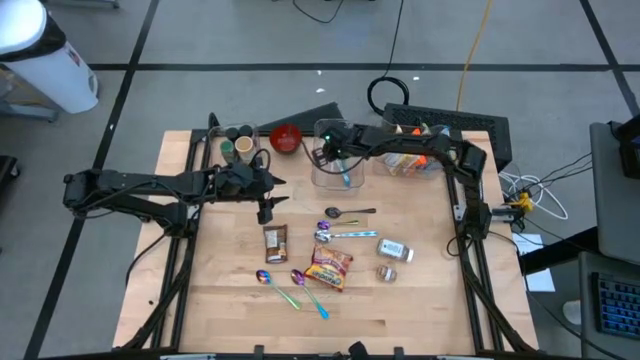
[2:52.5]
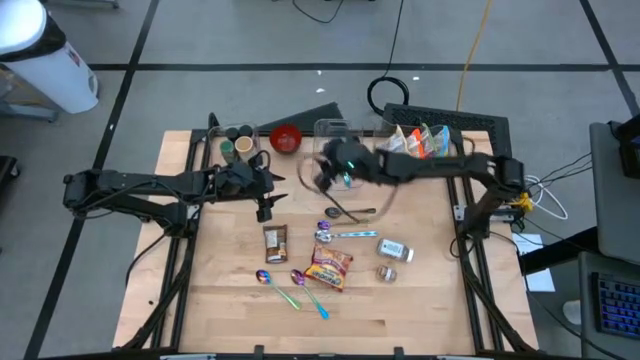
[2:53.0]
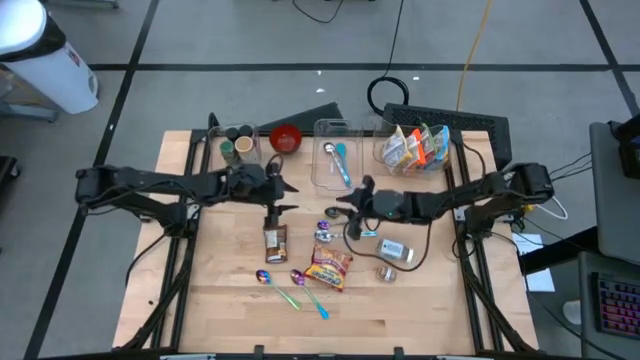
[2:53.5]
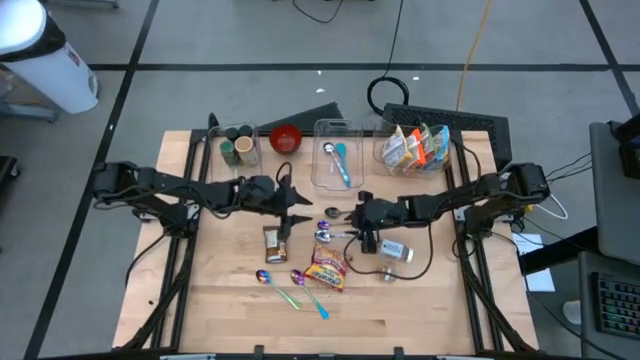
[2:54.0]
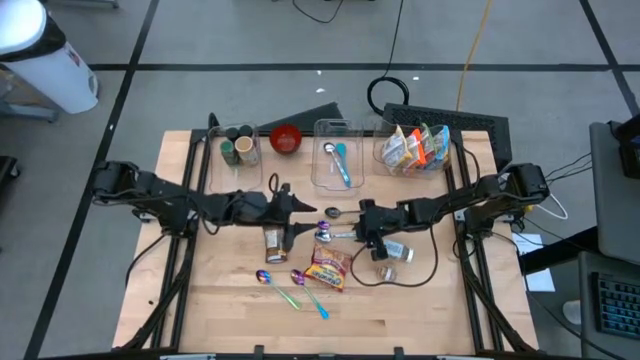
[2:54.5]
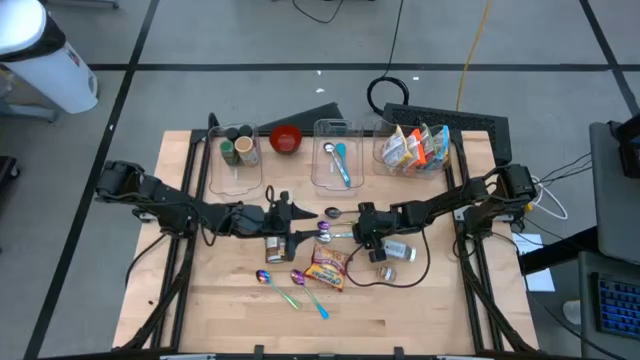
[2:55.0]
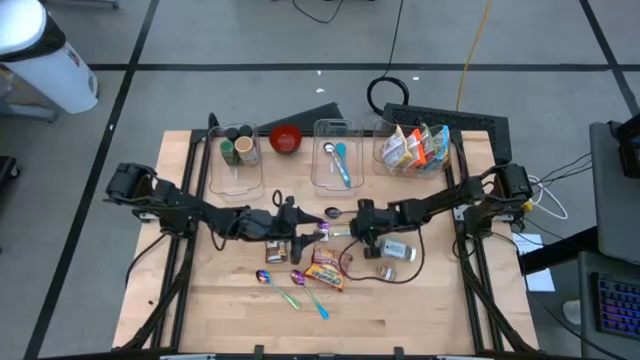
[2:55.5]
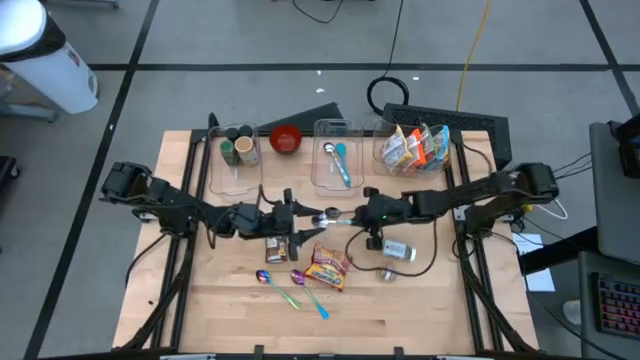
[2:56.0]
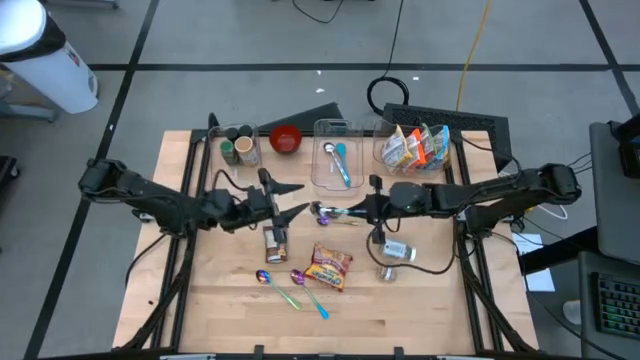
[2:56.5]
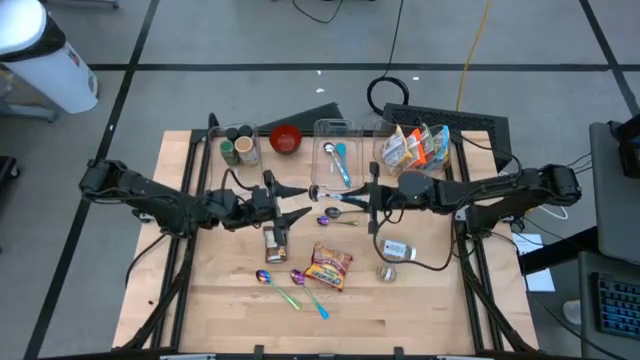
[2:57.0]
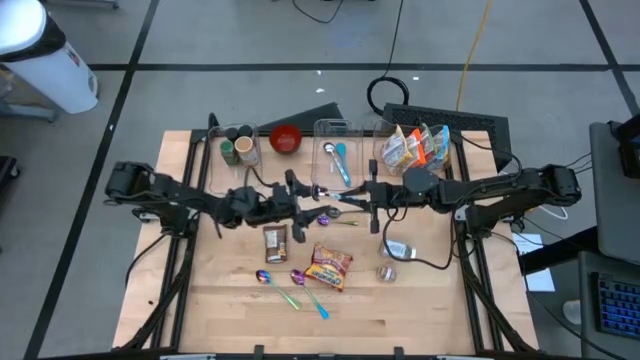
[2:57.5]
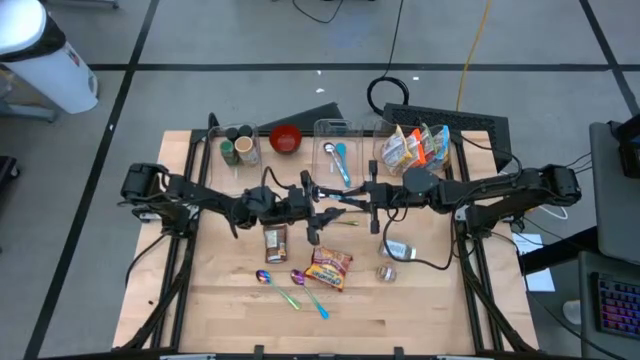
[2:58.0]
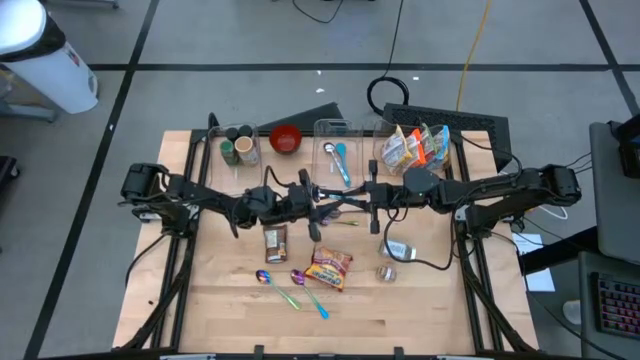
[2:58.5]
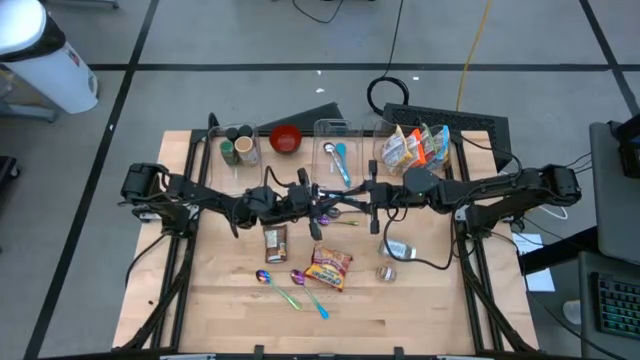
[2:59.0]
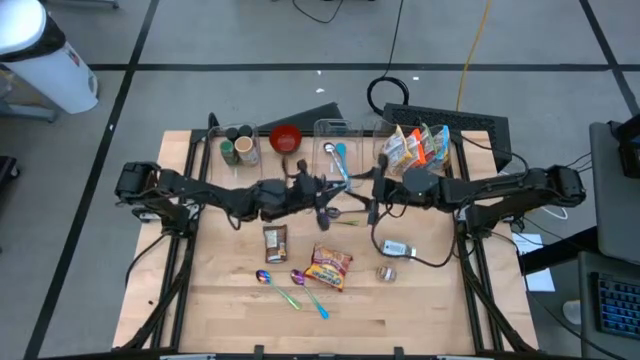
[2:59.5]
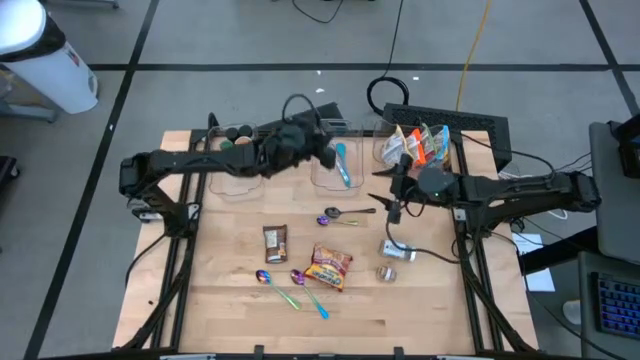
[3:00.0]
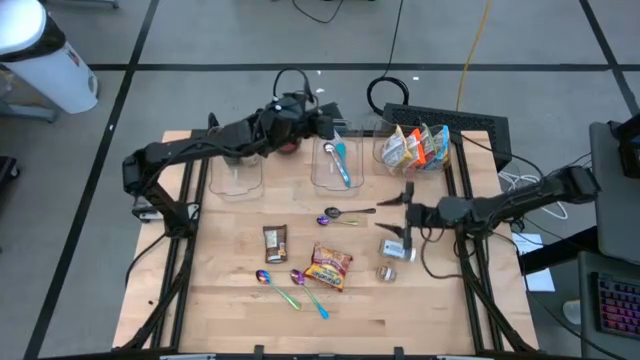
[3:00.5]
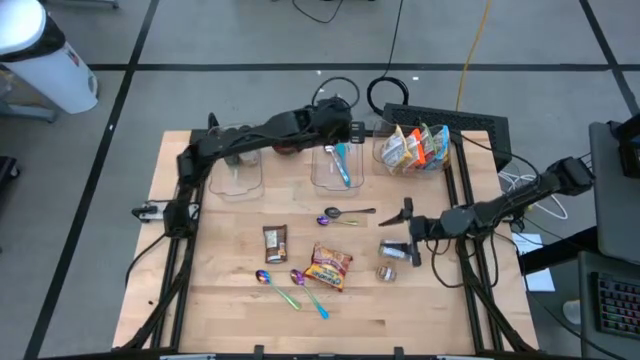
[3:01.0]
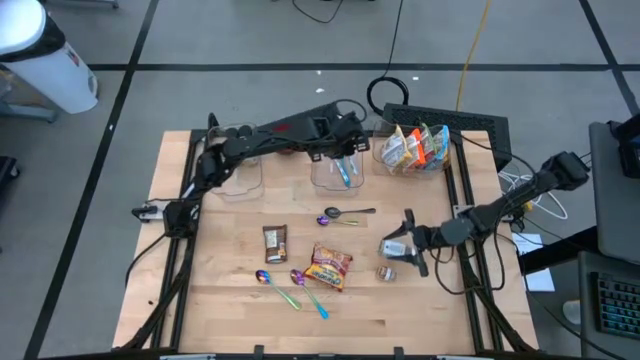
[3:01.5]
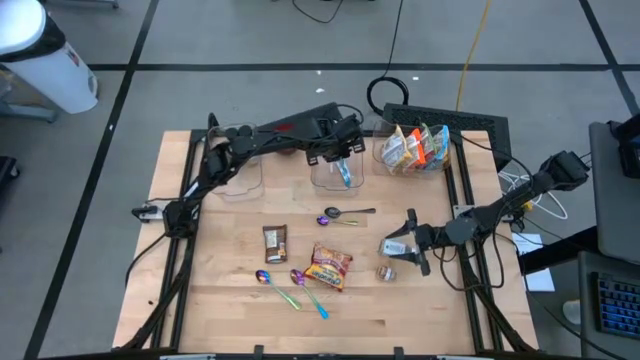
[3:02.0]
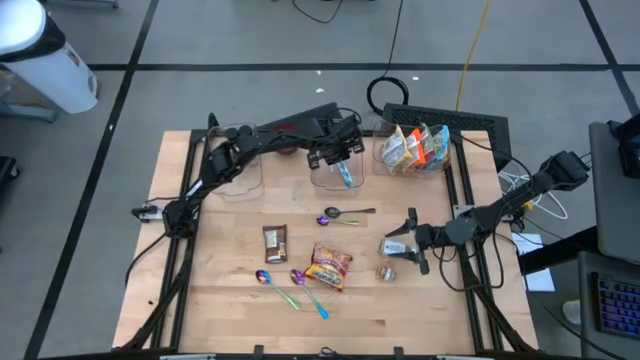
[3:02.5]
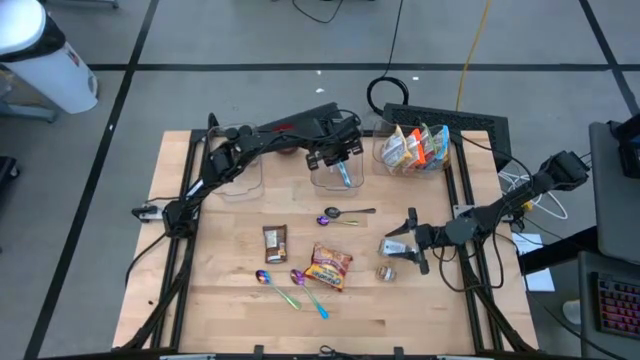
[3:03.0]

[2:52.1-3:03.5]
Task: Pick & Place Food Item
Put the blue patterned spoon into the middle transparent bin

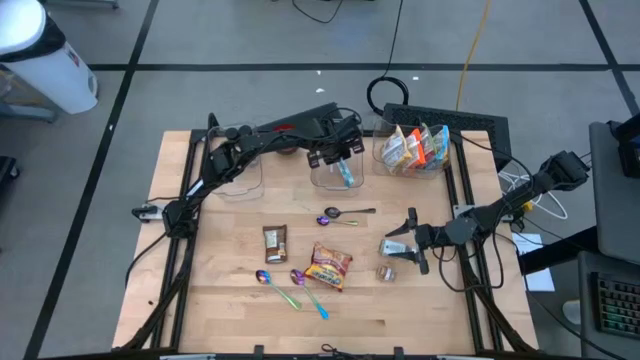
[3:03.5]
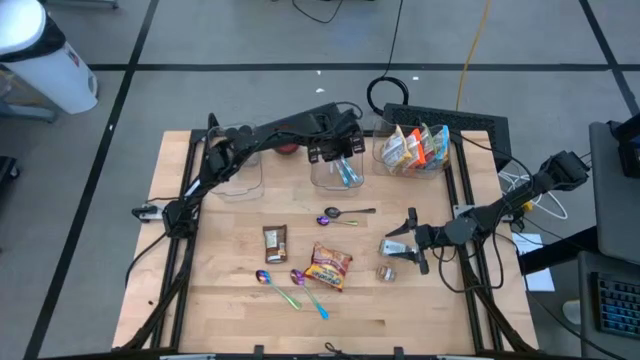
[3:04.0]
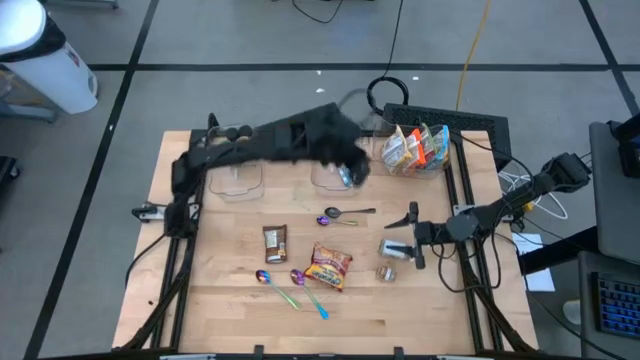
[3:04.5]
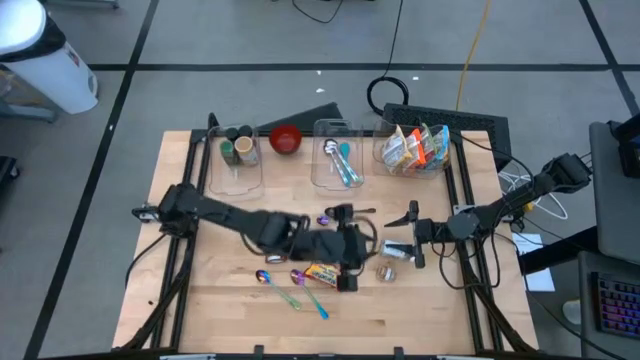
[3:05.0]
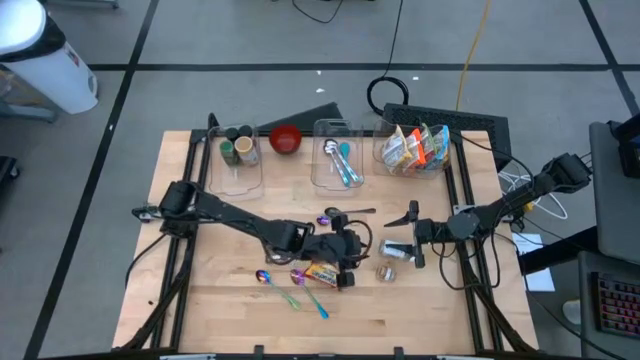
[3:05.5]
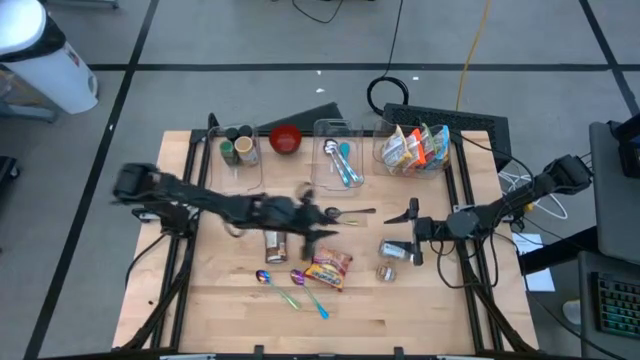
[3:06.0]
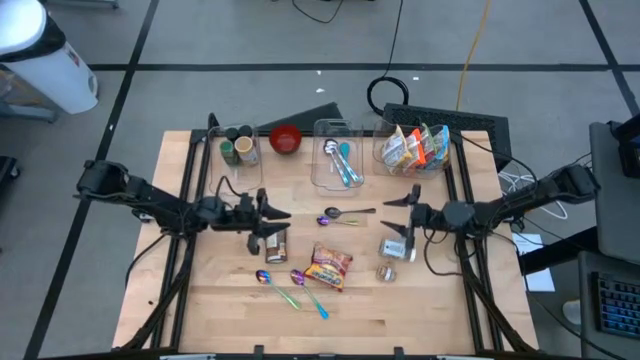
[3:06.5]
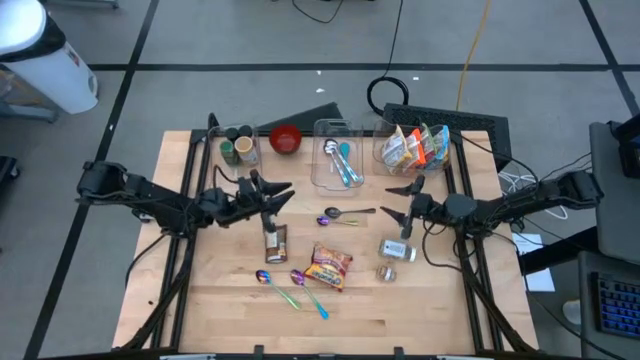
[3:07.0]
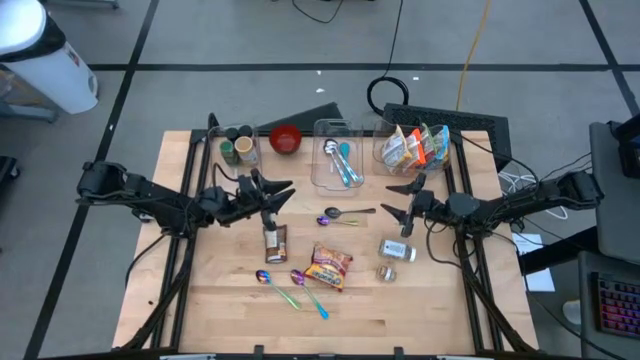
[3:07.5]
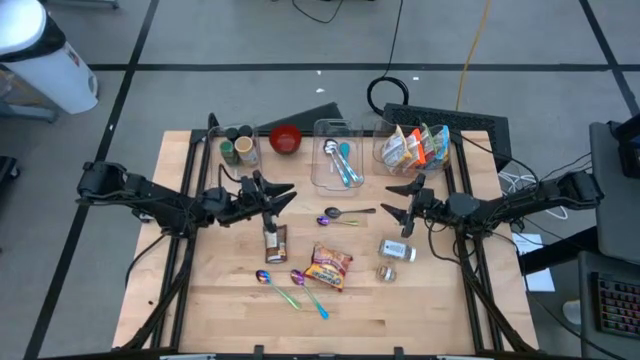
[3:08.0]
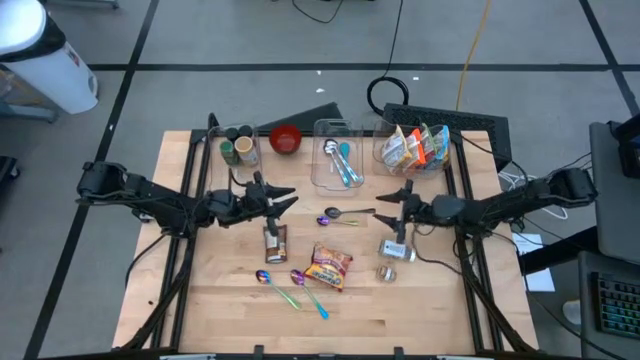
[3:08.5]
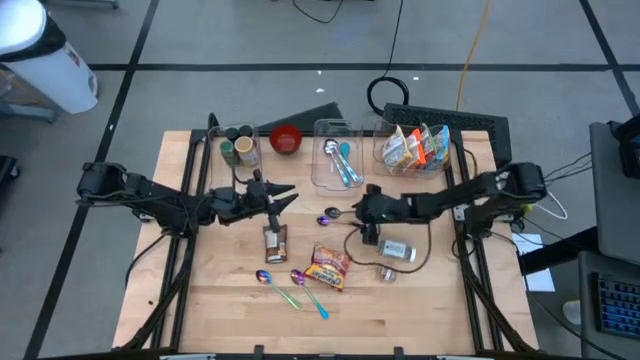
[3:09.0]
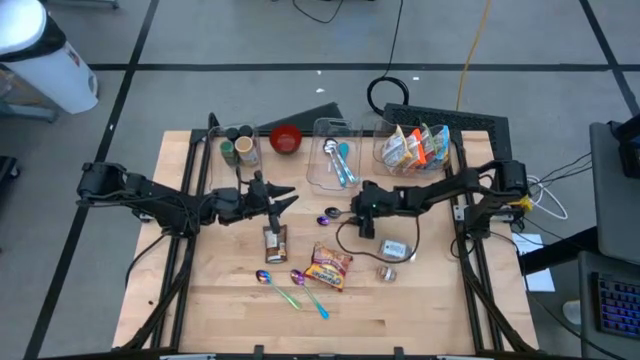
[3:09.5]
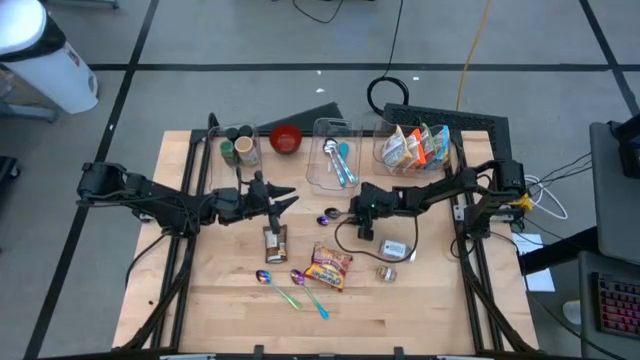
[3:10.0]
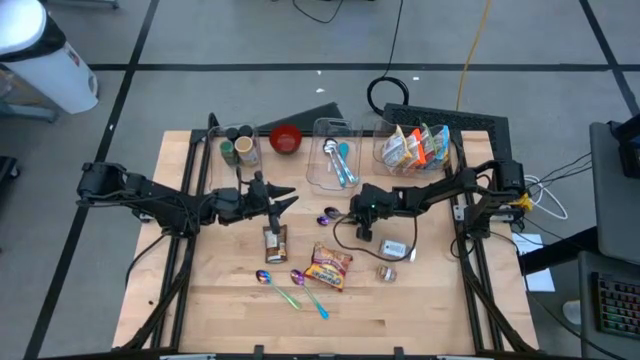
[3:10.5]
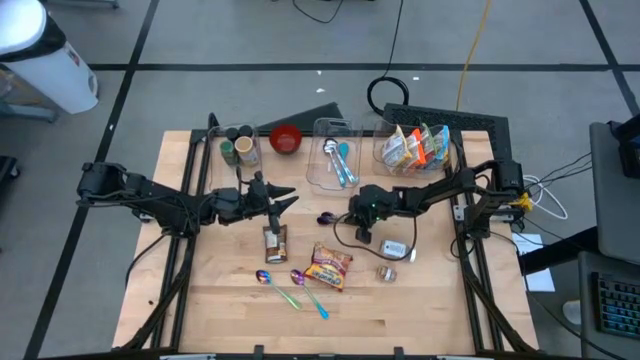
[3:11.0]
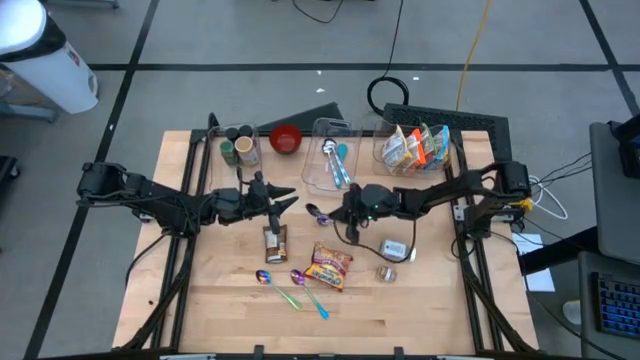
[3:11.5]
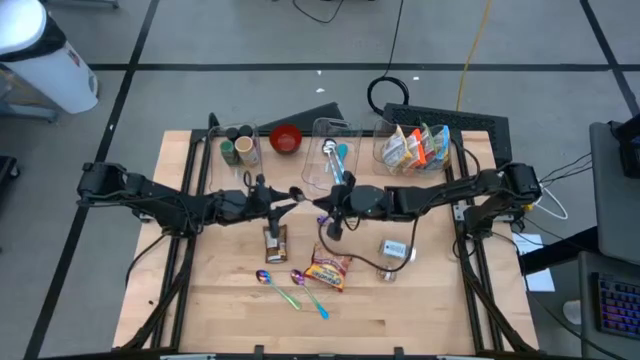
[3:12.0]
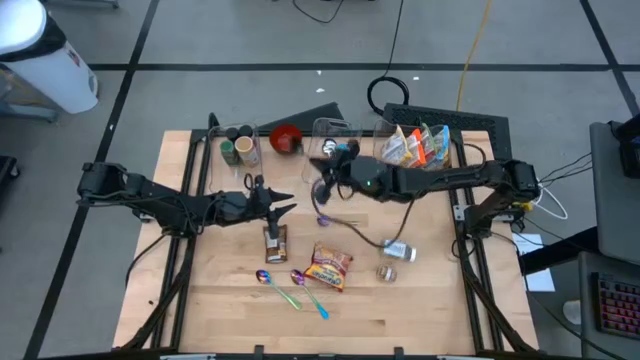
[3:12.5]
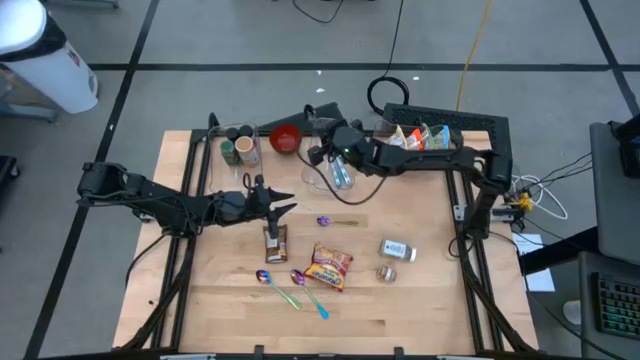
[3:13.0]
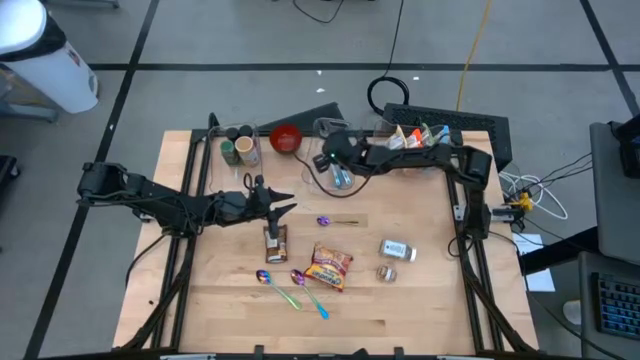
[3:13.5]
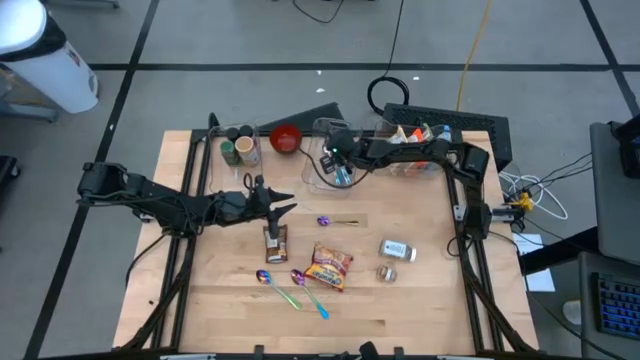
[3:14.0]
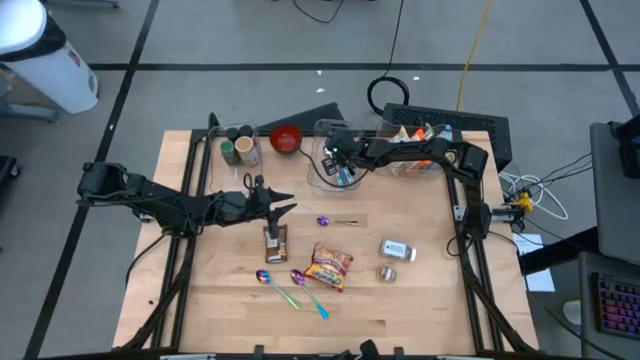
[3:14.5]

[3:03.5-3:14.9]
Put the silver spoon into the middle transparent bin
